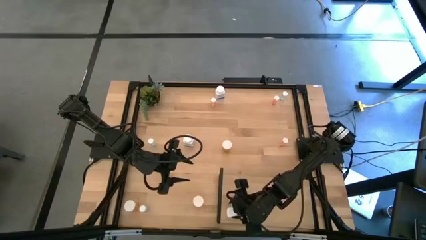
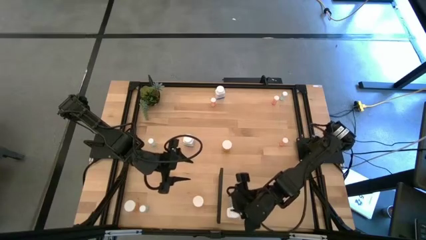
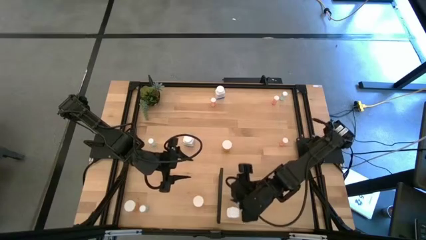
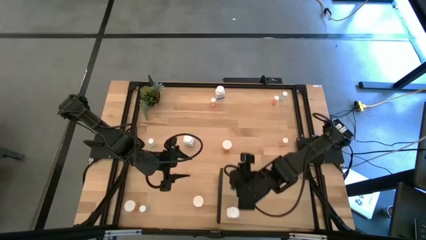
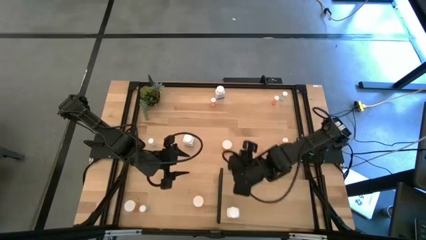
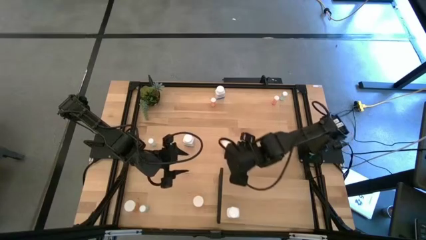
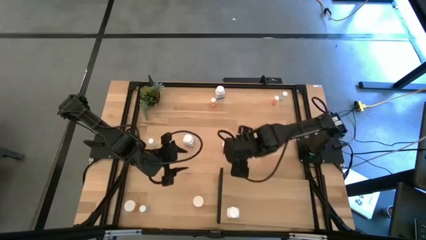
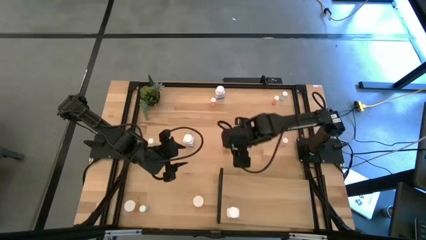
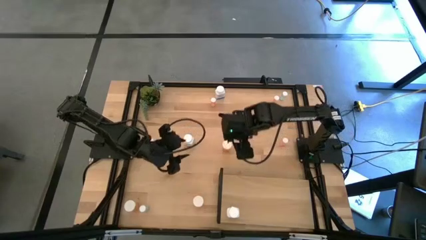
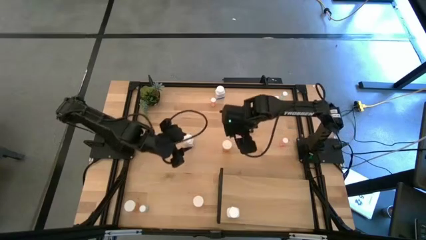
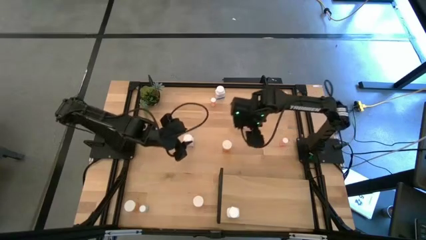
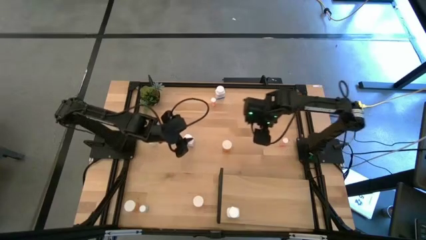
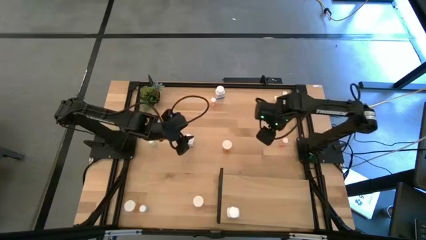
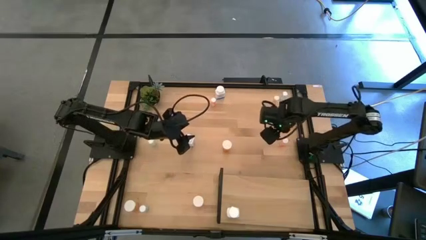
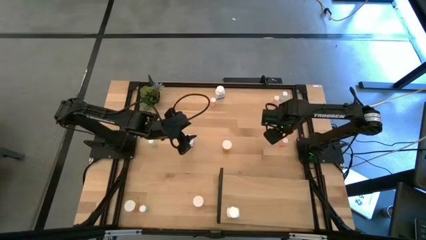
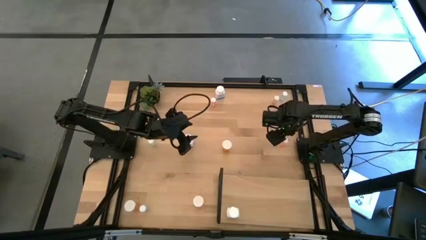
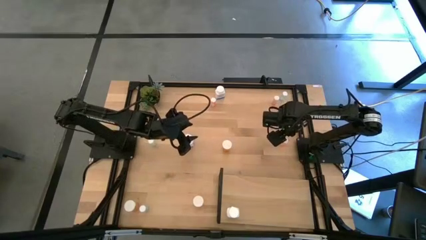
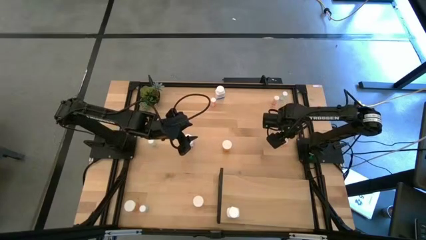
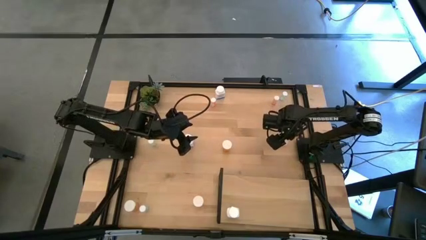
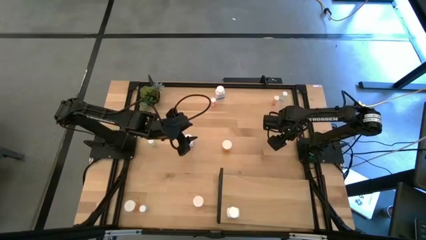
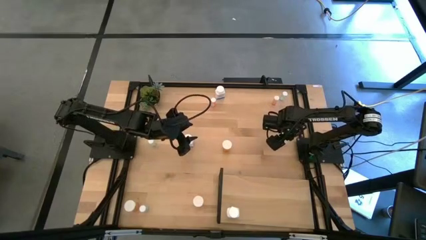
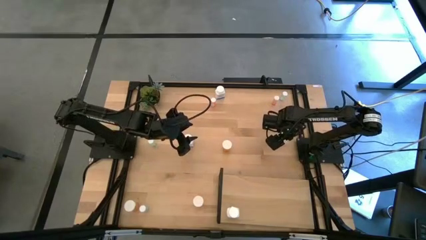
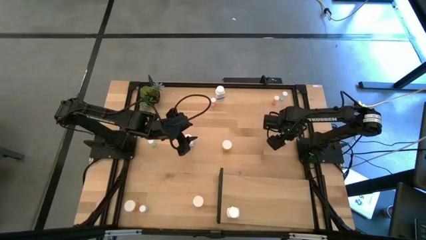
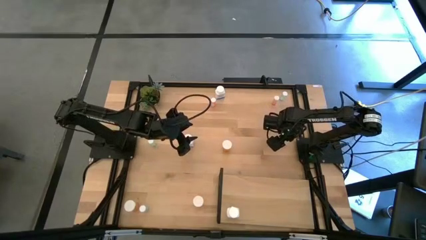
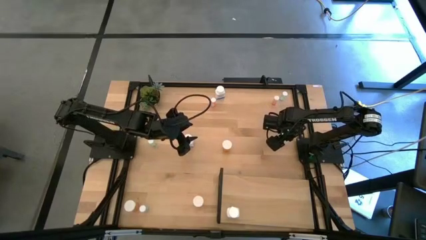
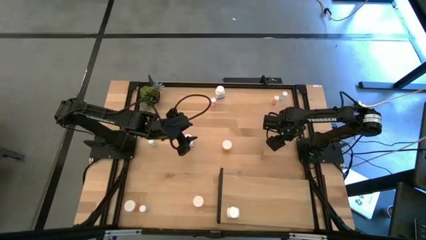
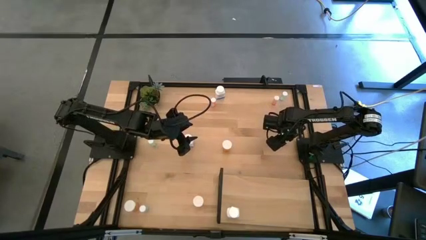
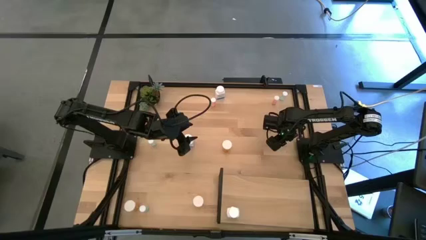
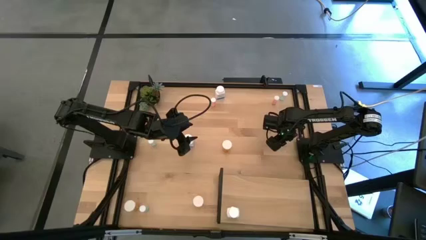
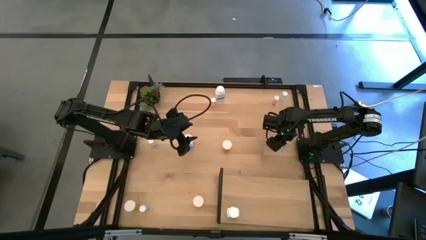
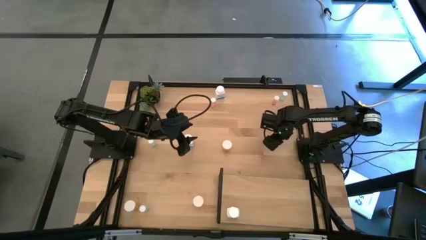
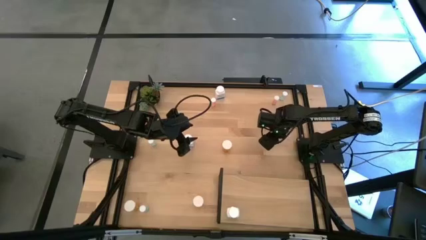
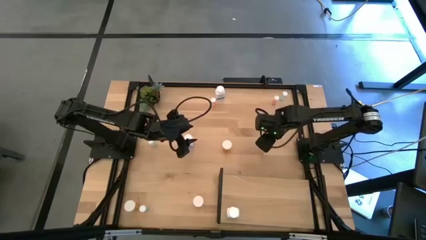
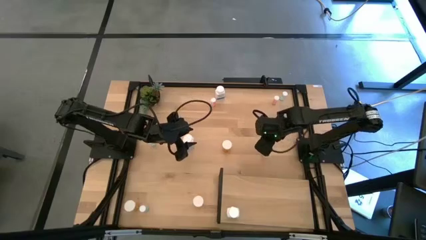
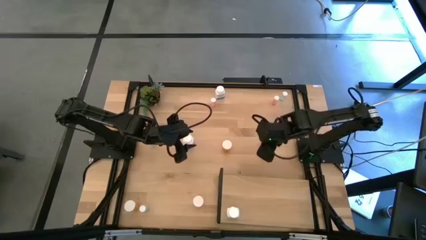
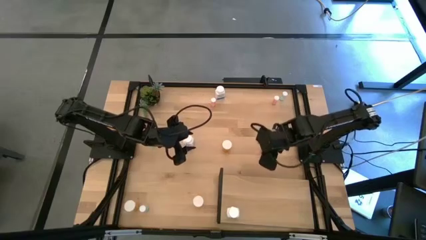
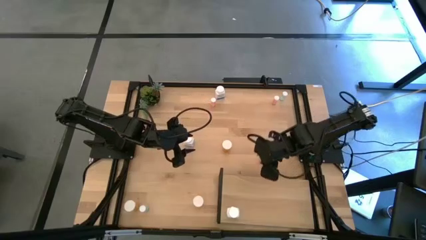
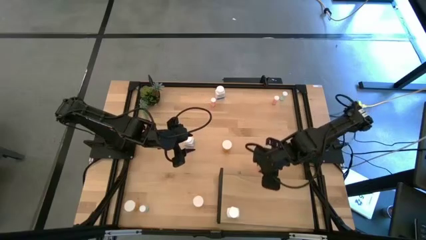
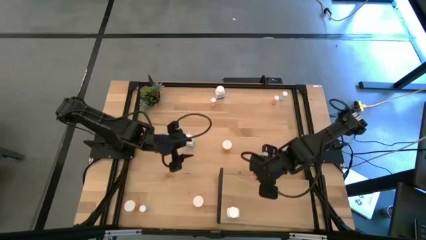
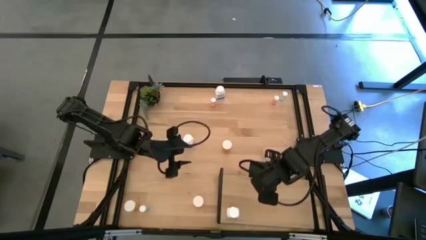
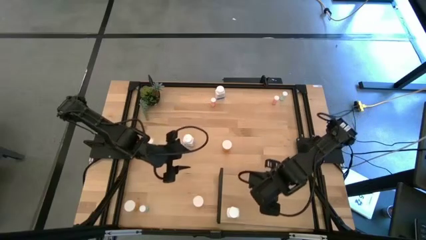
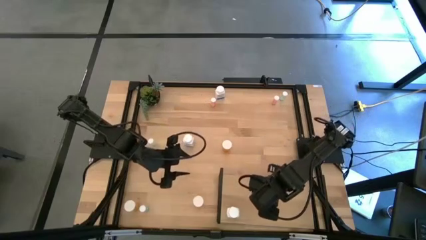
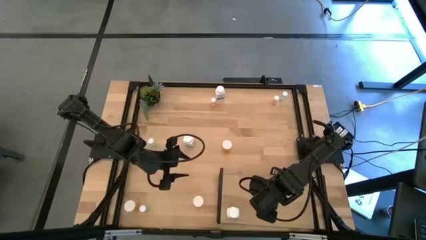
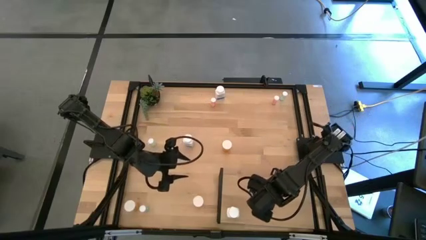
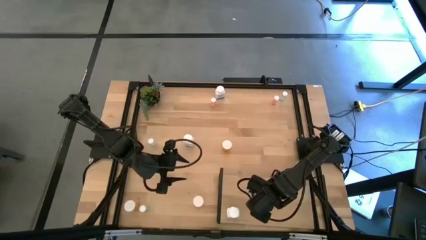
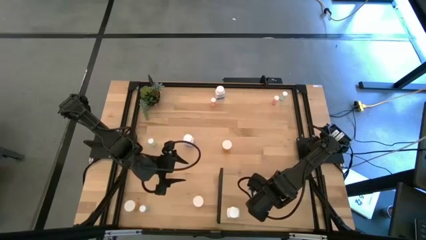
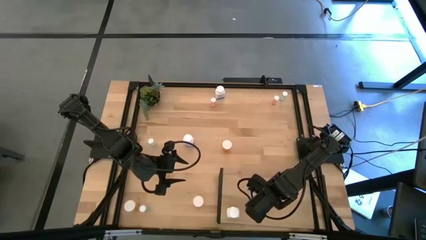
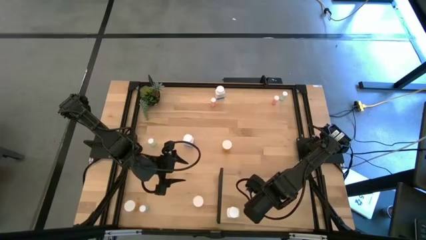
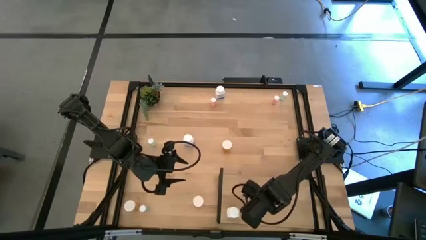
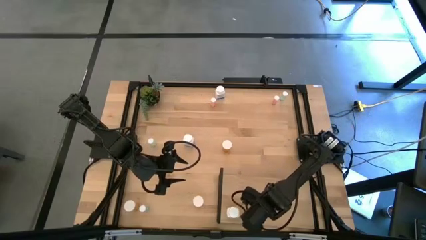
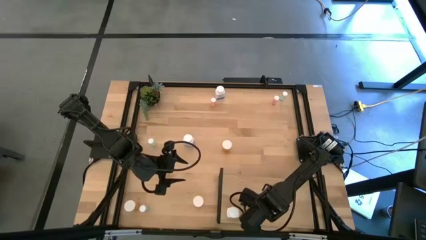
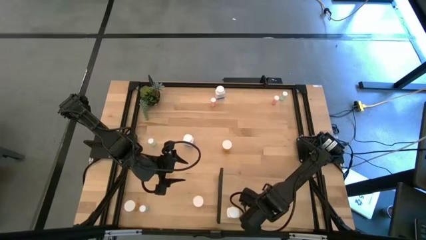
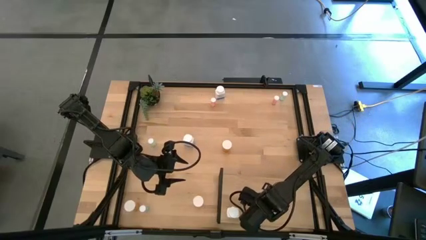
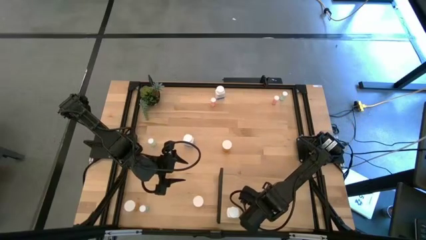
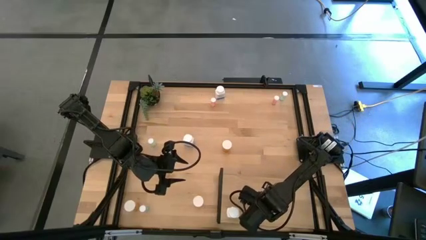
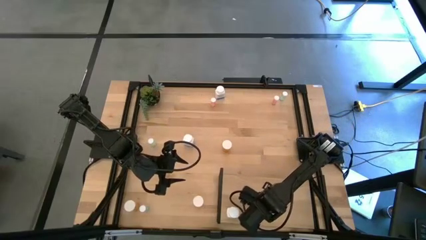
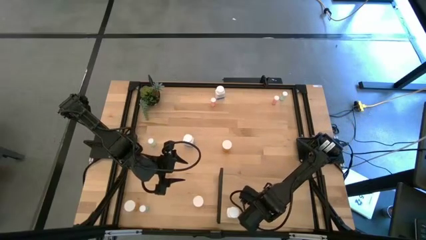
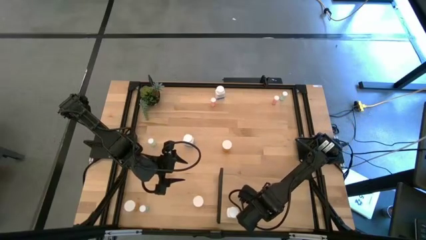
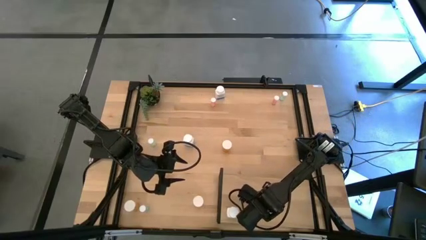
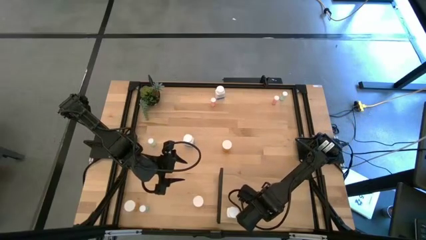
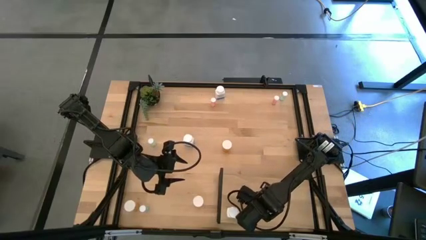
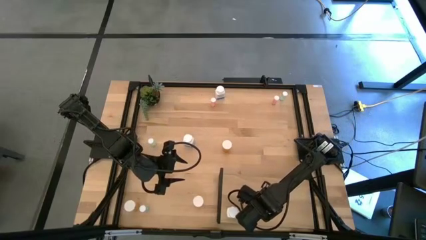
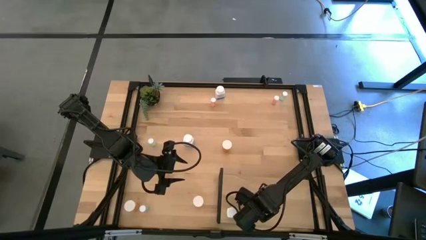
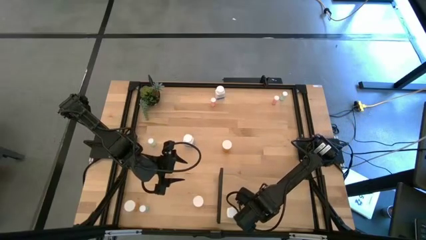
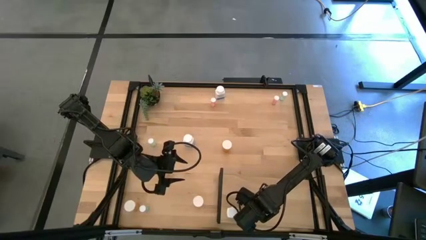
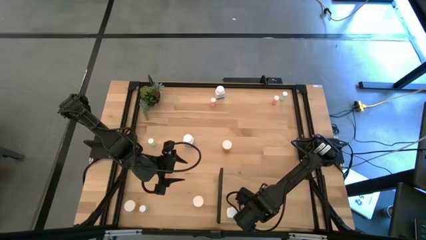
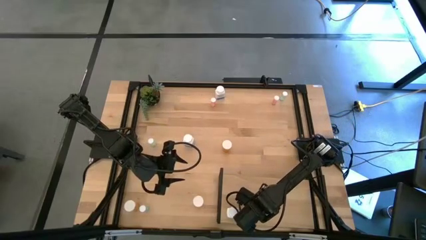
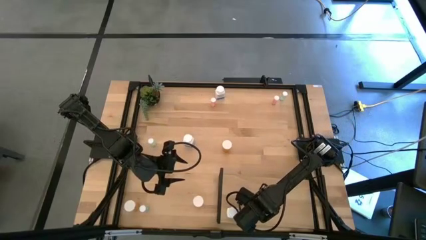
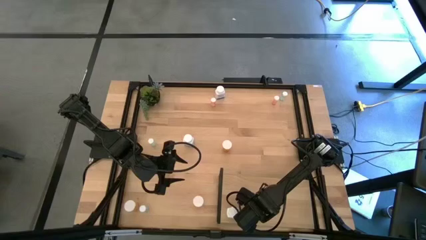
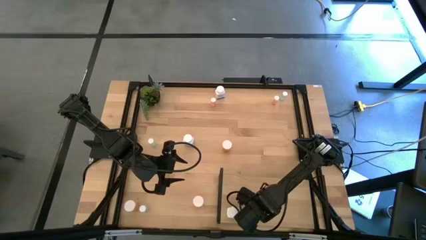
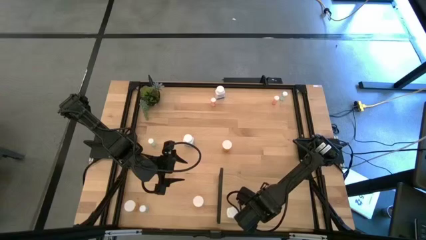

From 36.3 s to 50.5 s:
Task: Pick and place medicine bottles onto shelf by color
Put the middle right pink pill bottle on the shelf
